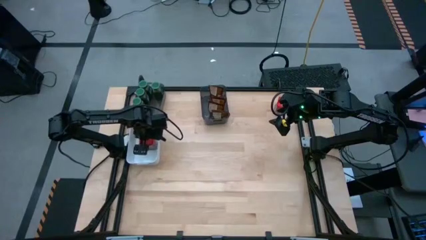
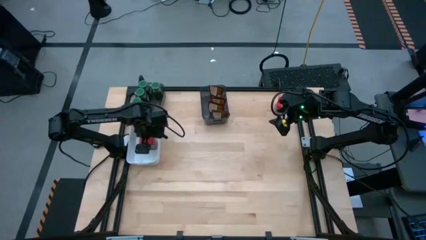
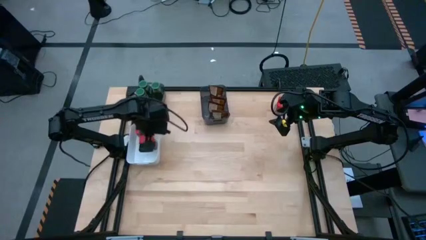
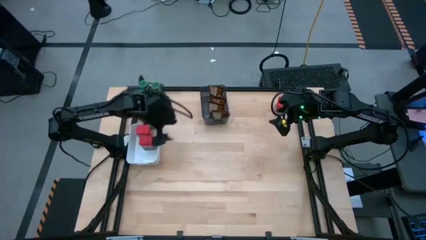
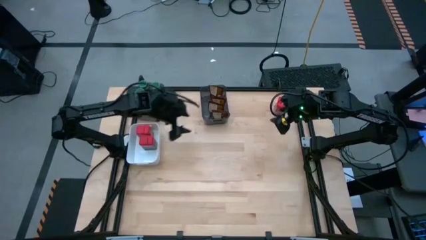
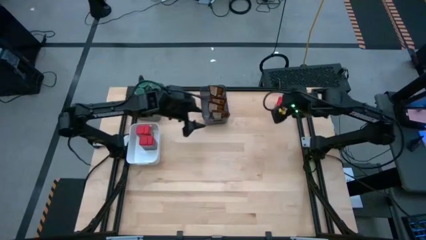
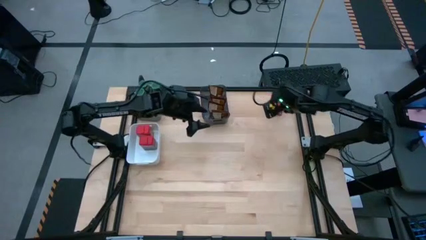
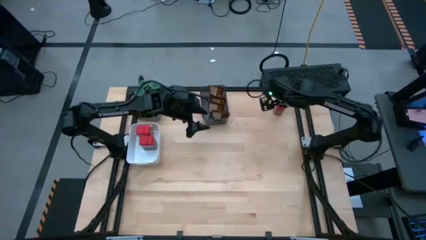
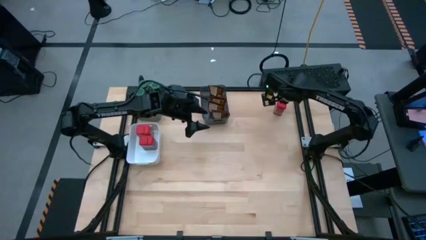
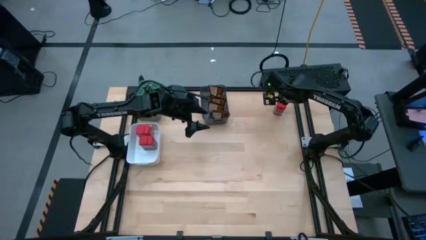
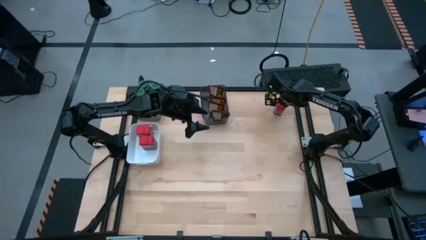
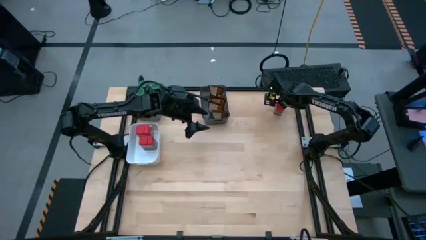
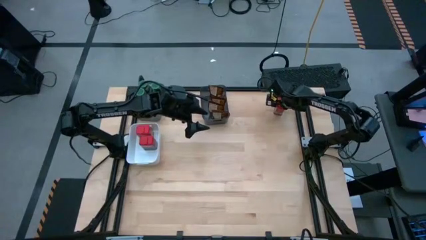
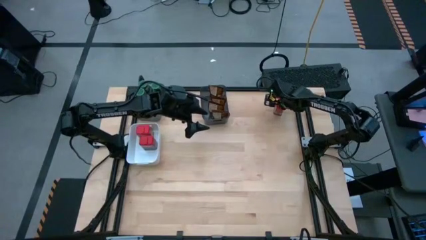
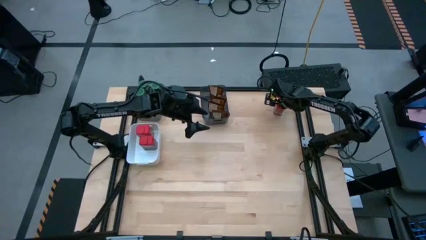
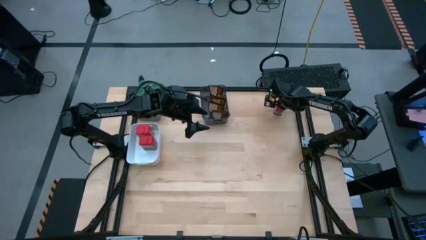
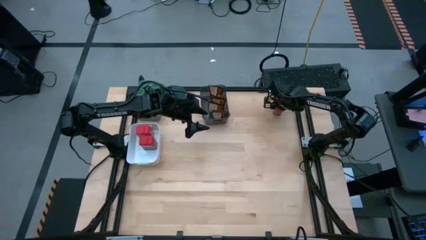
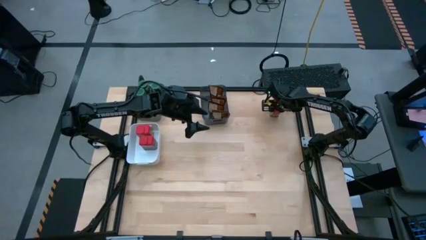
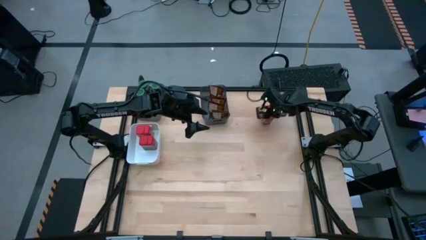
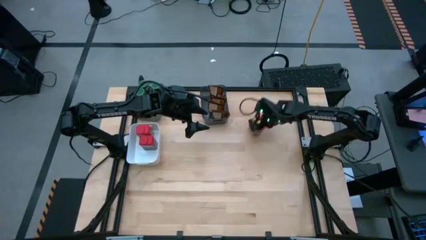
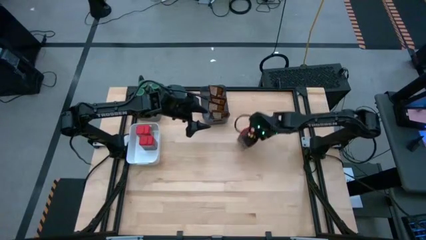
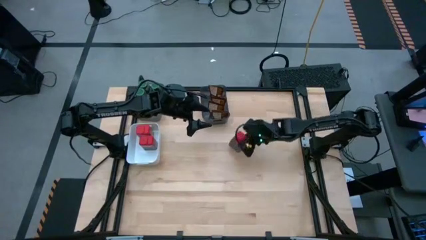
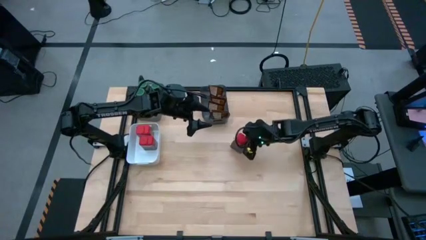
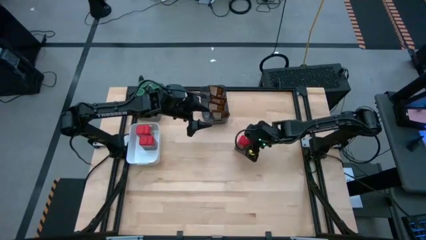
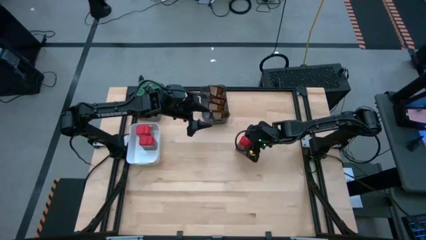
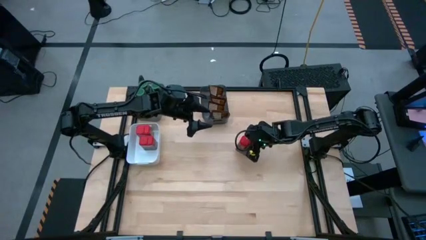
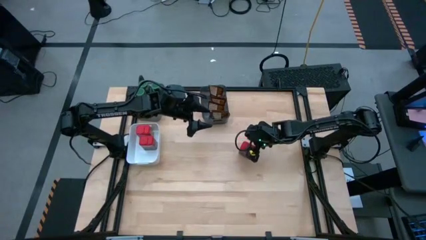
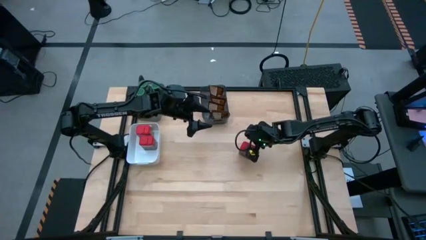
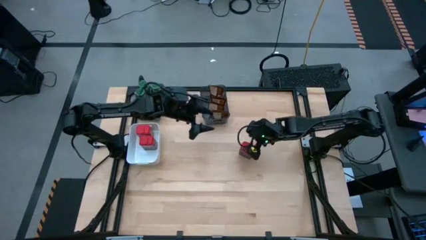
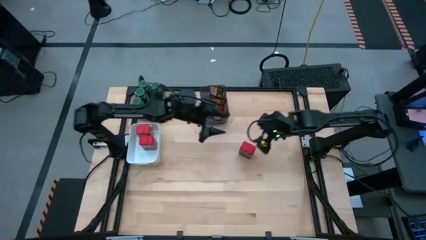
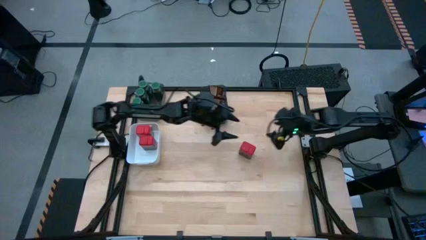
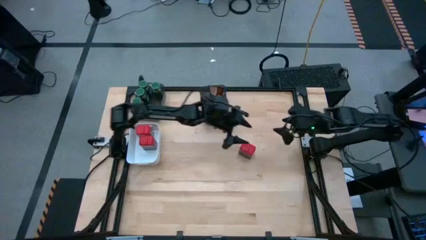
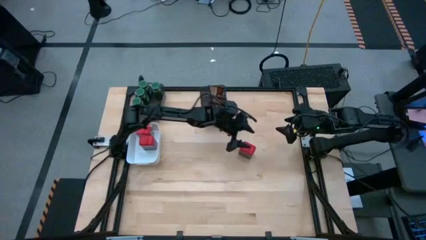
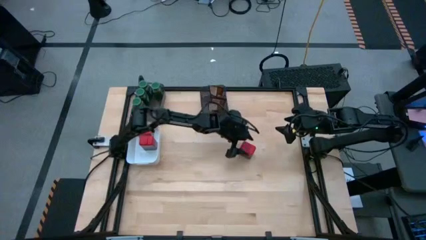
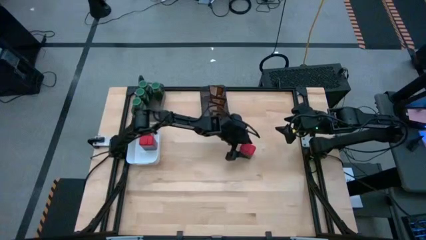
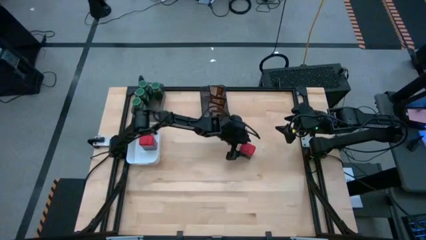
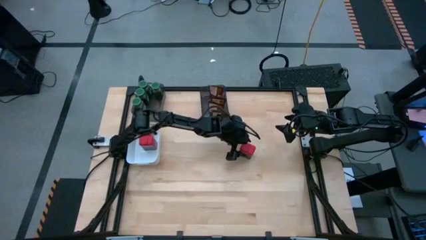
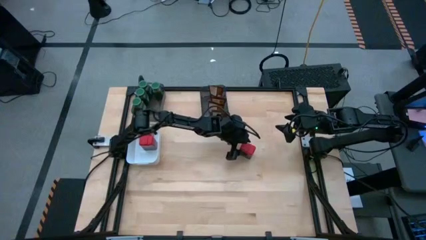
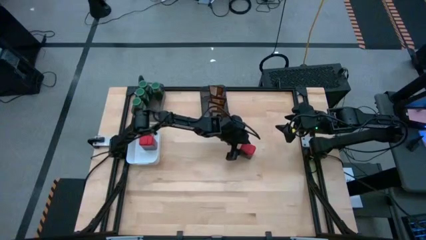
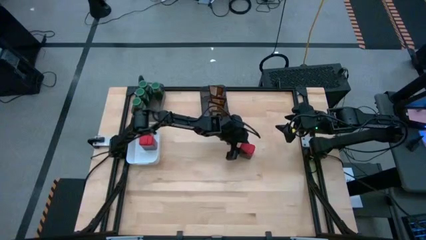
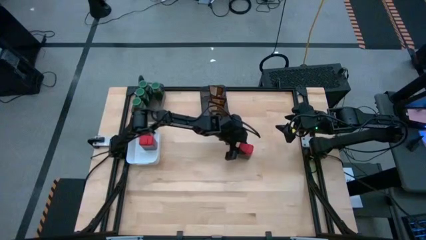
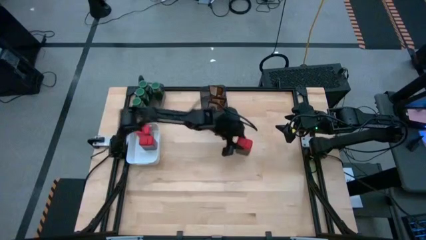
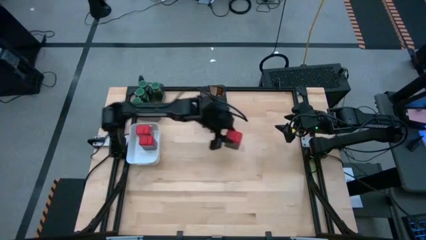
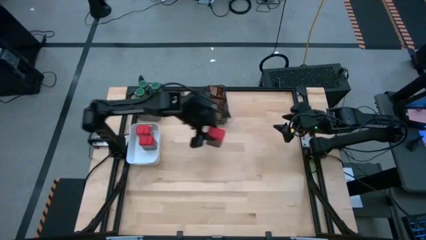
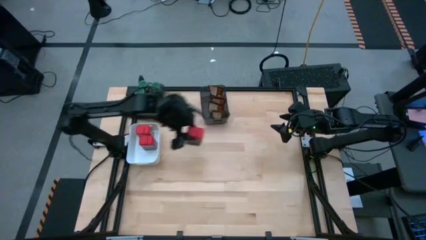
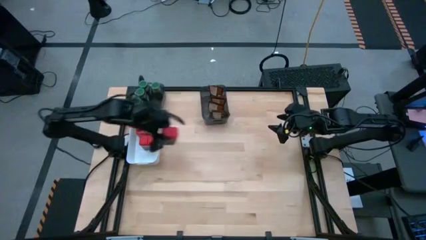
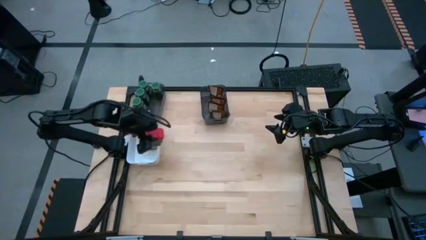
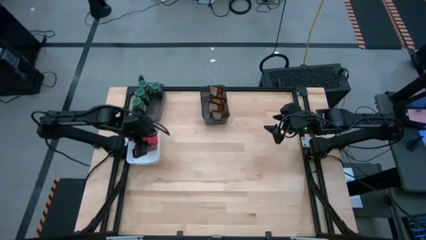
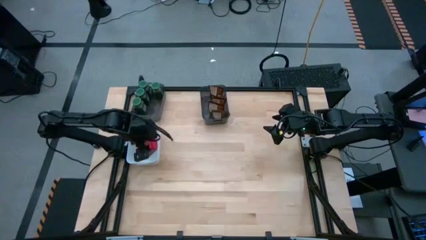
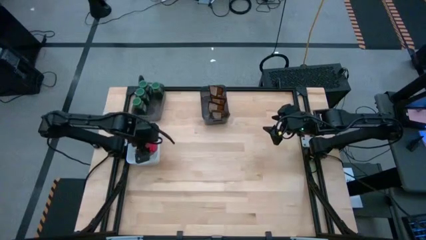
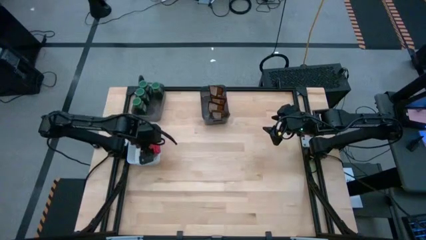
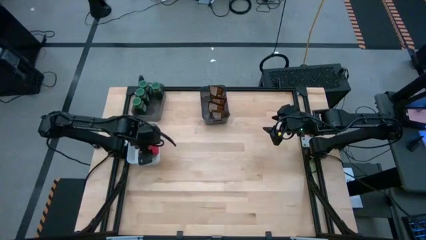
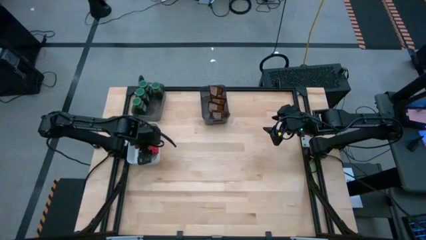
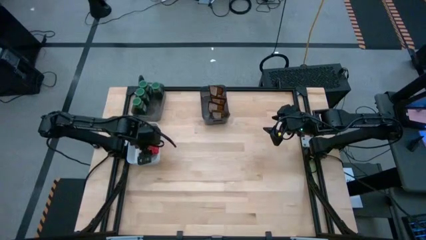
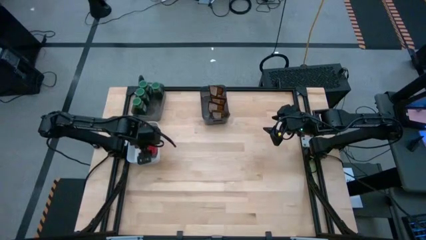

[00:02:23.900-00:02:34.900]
Task: Sort spices by type
Put the red seasoning can into the white bin

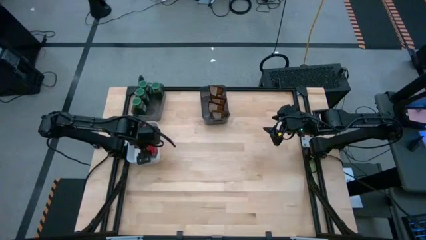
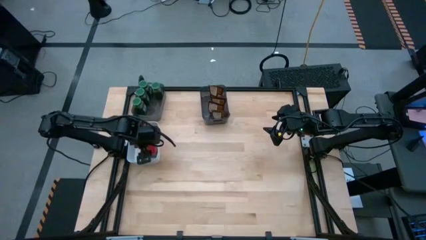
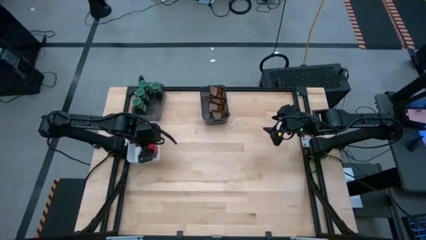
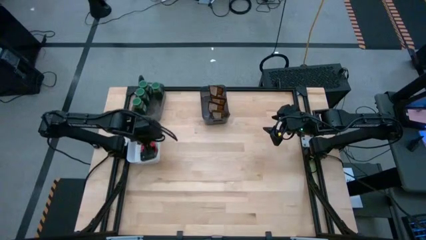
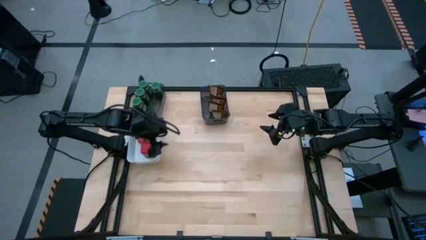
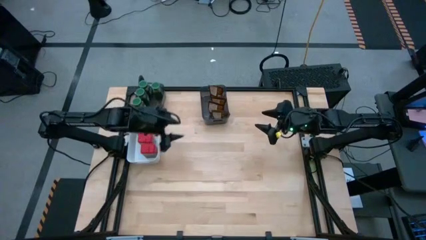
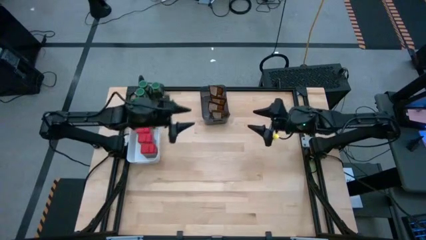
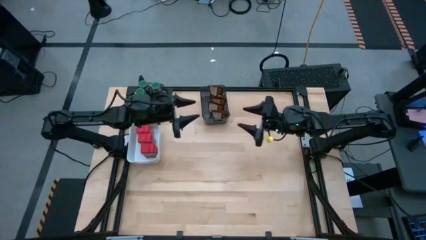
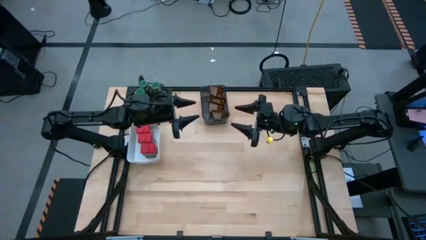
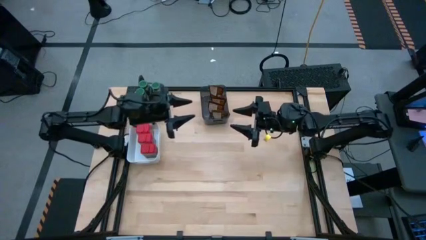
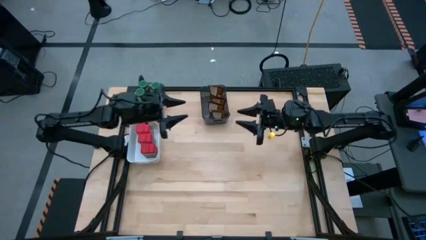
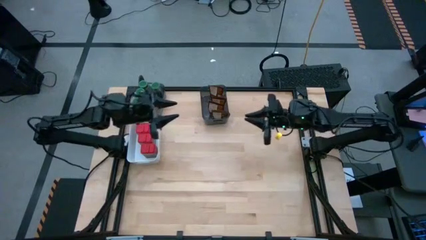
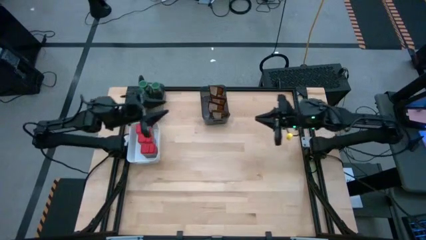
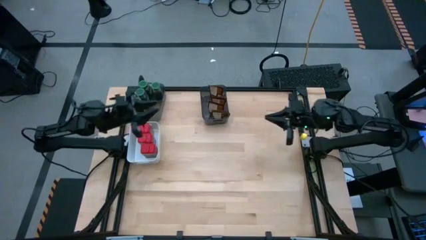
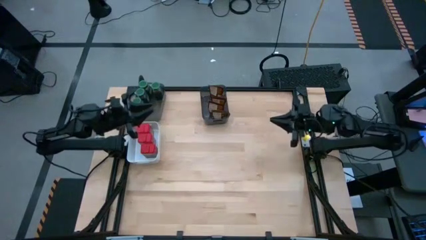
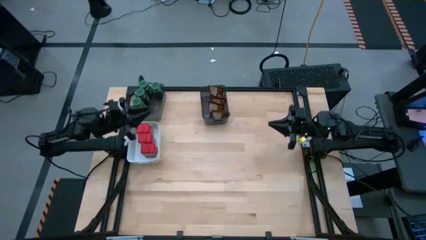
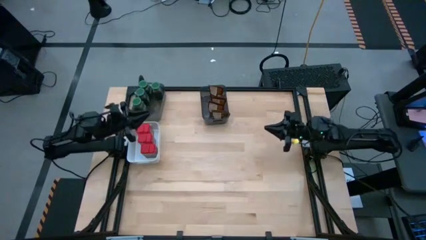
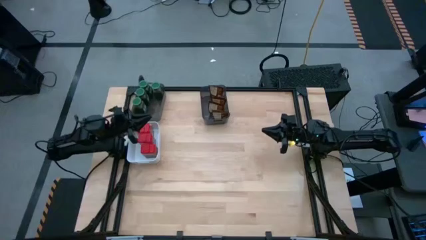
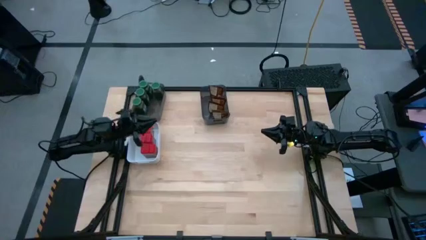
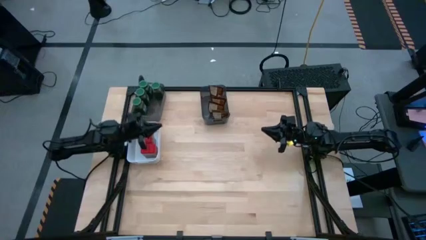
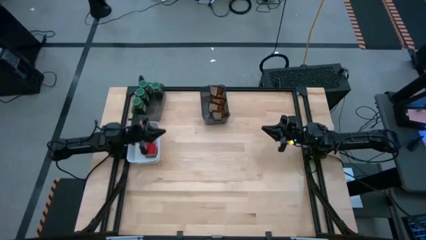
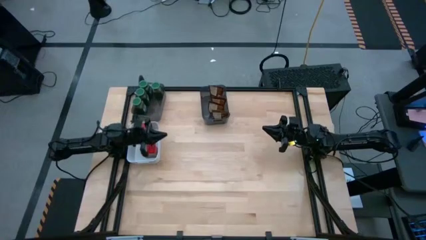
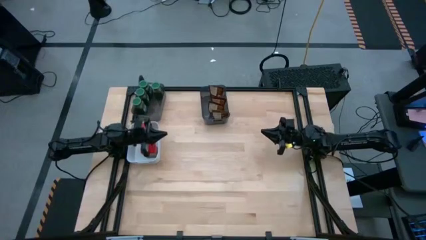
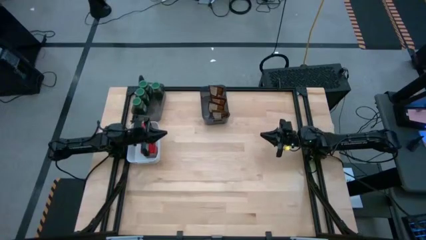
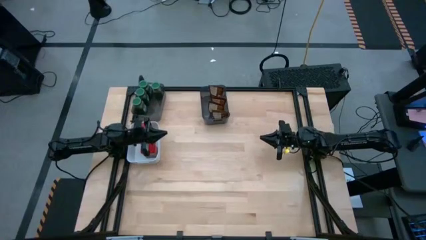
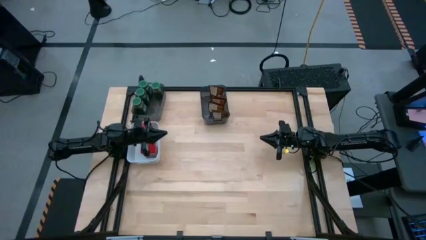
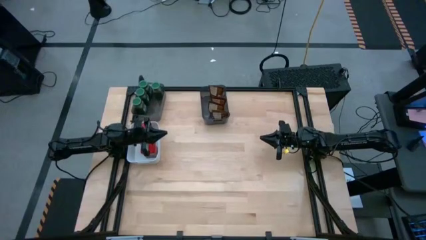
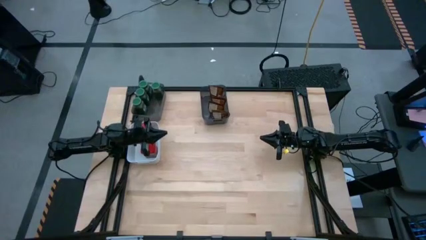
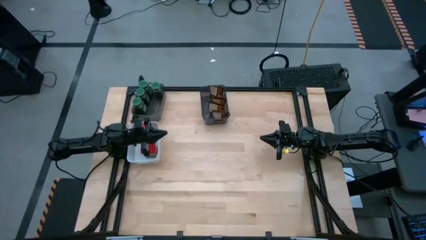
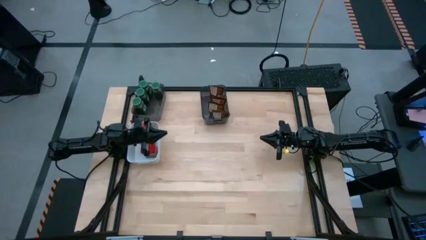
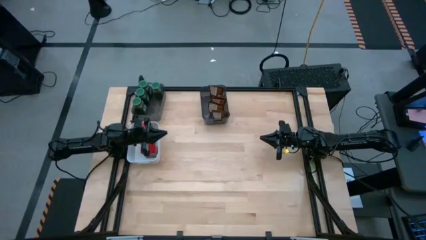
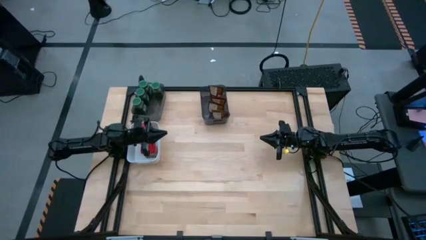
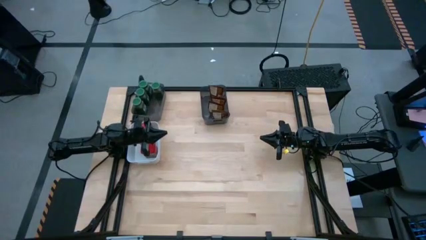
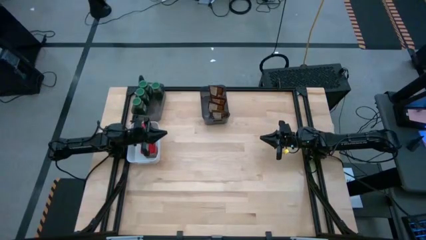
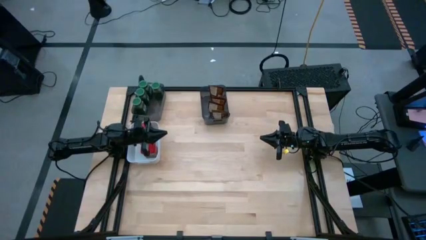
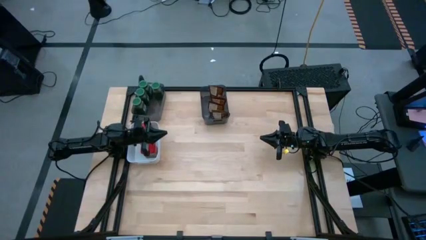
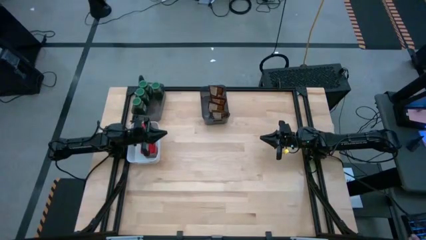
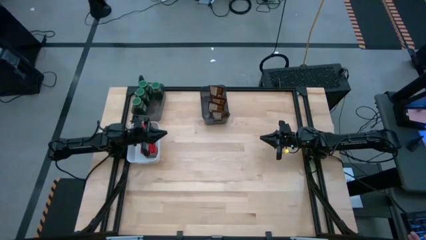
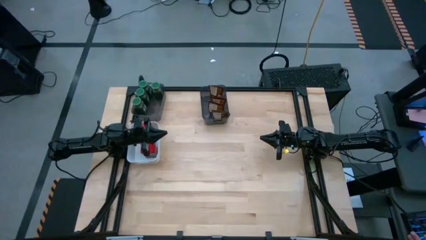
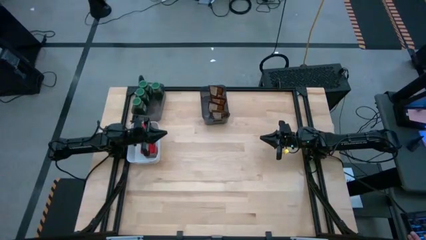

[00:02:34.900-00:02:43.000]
Return to Home Position
